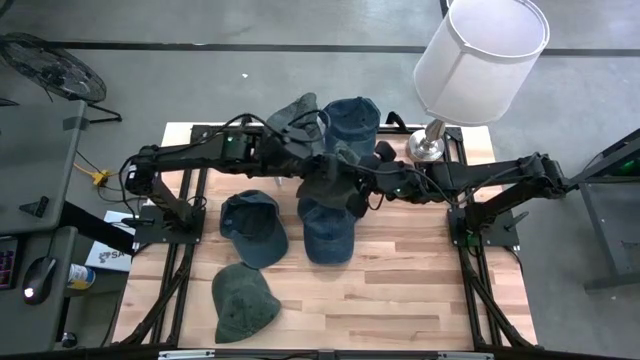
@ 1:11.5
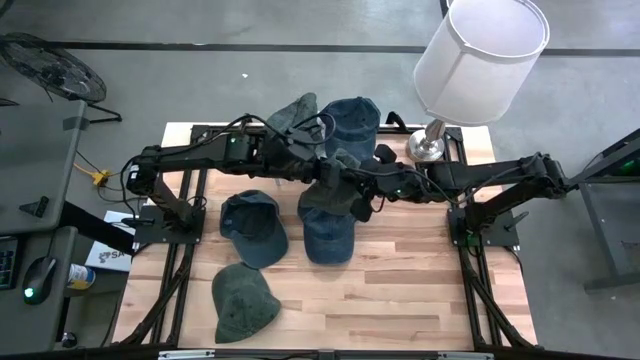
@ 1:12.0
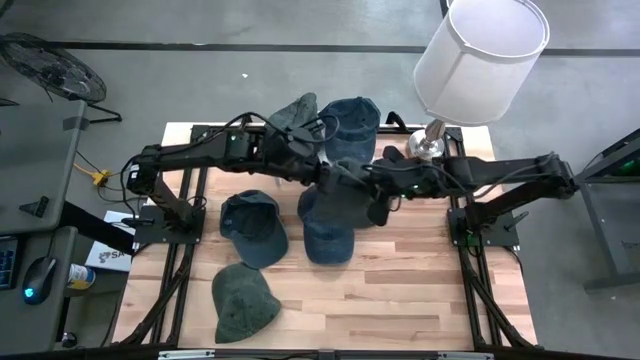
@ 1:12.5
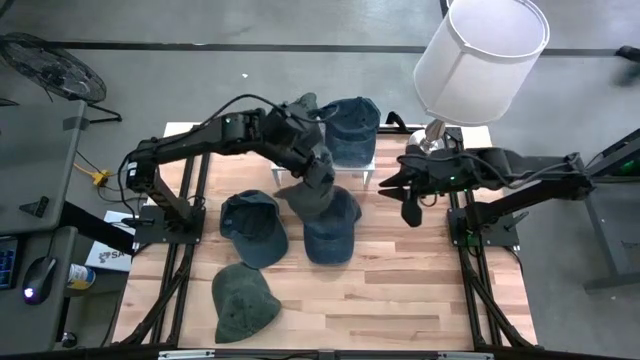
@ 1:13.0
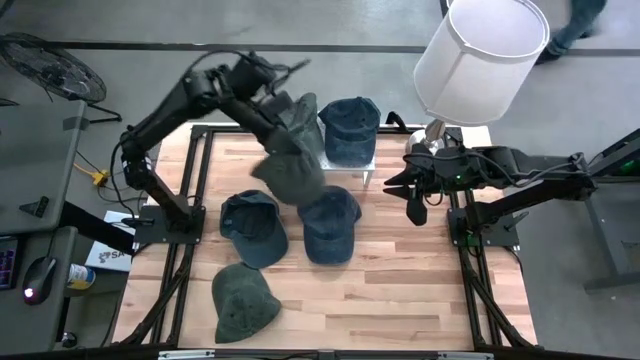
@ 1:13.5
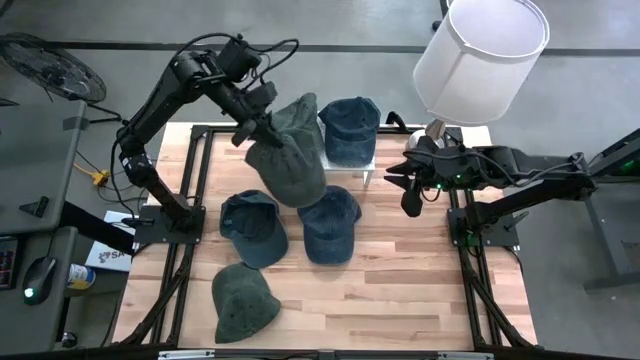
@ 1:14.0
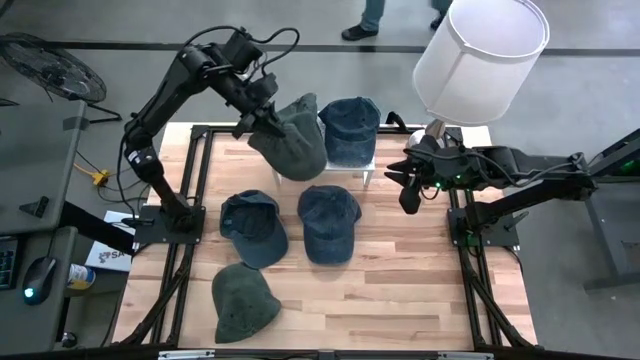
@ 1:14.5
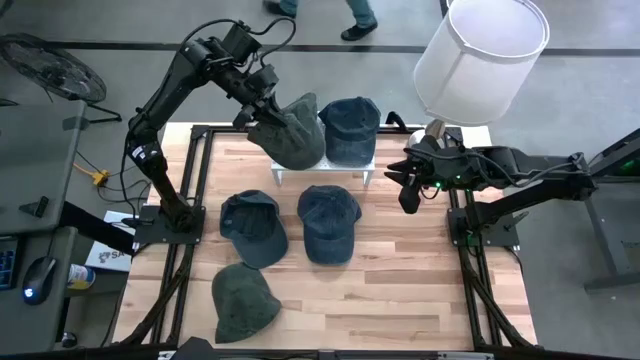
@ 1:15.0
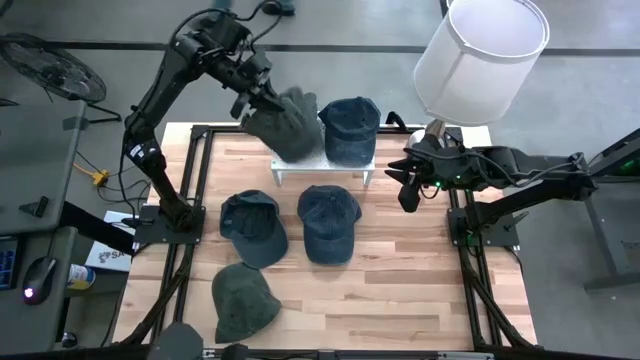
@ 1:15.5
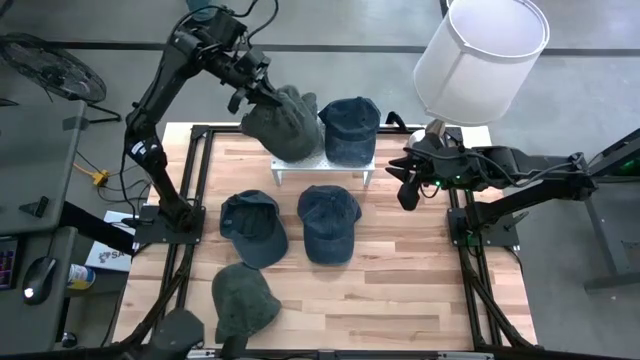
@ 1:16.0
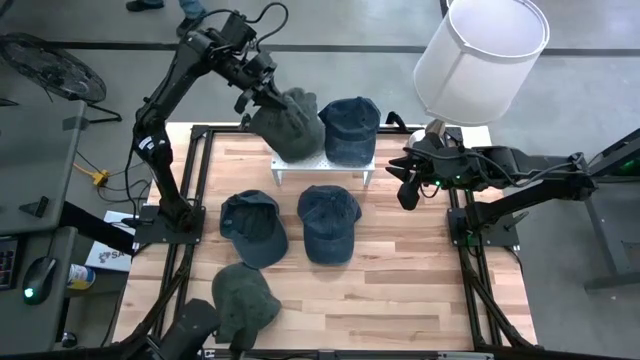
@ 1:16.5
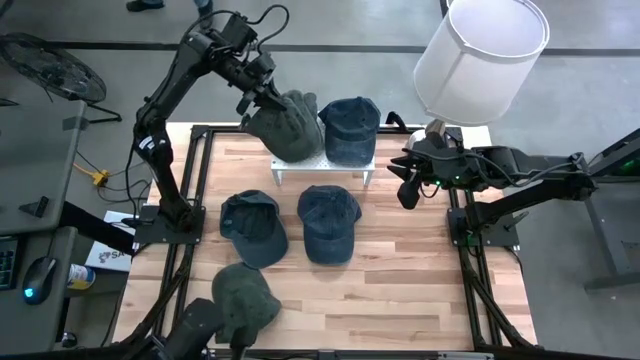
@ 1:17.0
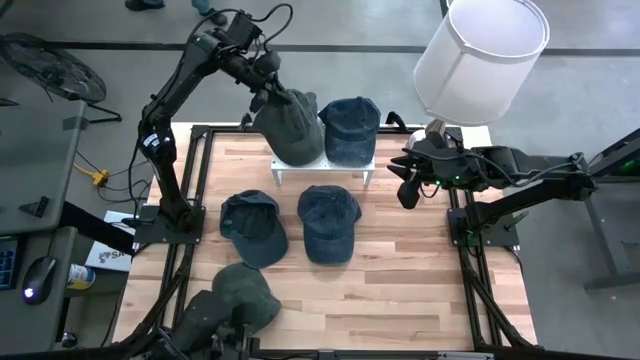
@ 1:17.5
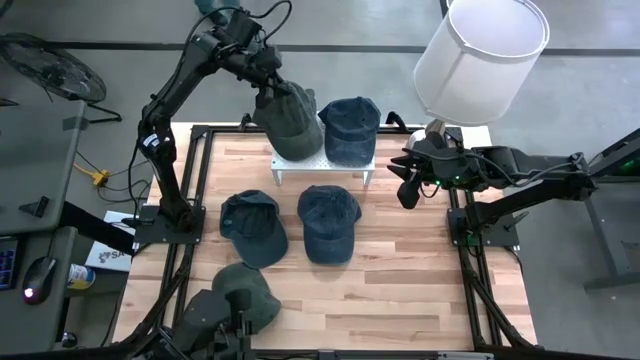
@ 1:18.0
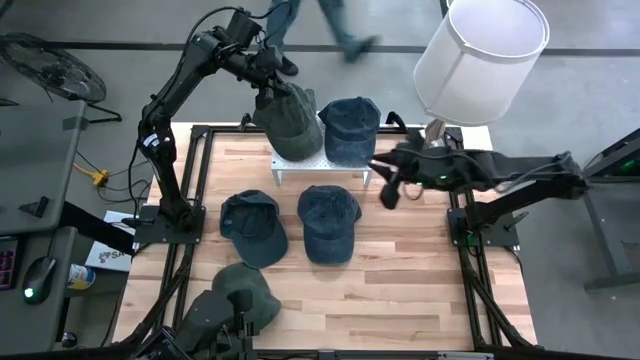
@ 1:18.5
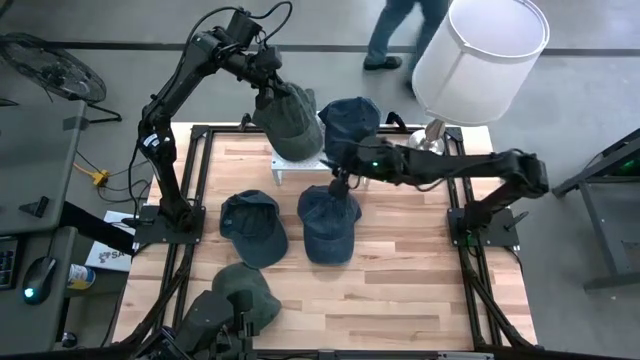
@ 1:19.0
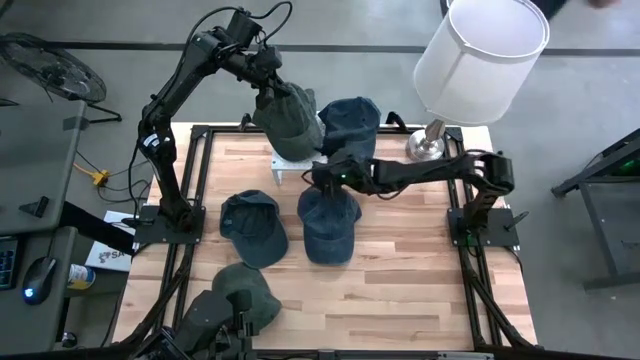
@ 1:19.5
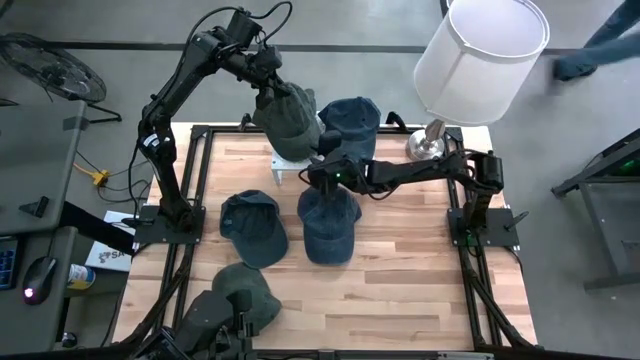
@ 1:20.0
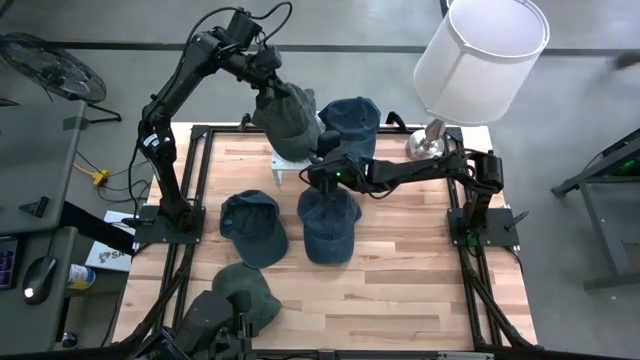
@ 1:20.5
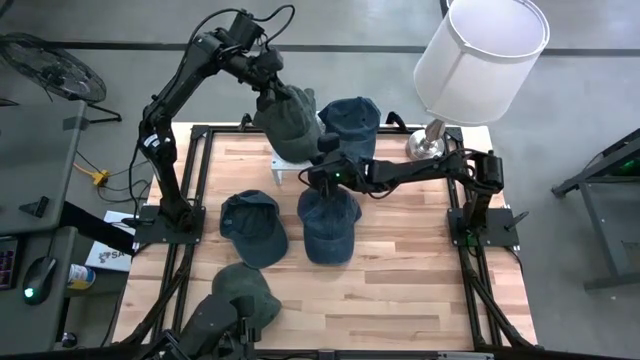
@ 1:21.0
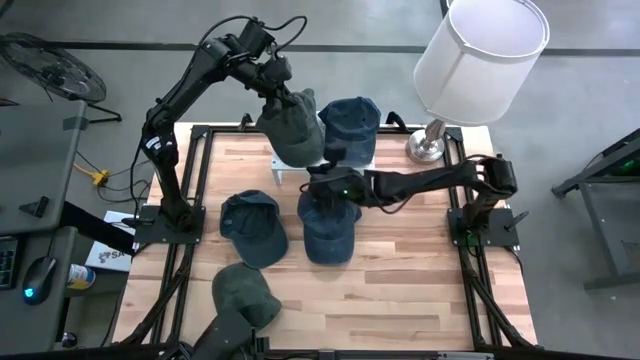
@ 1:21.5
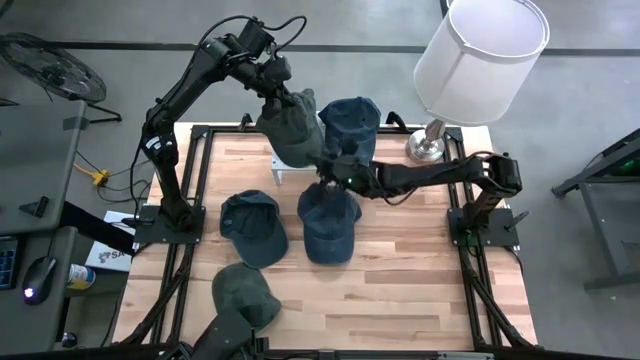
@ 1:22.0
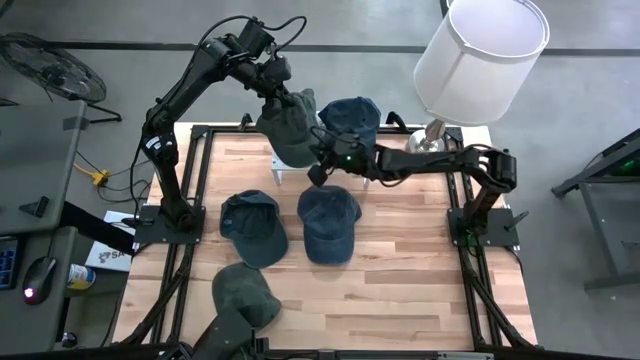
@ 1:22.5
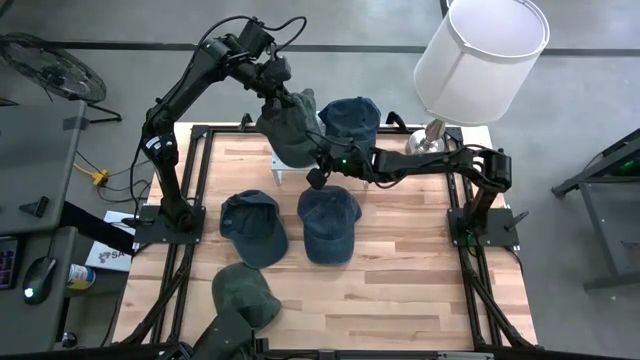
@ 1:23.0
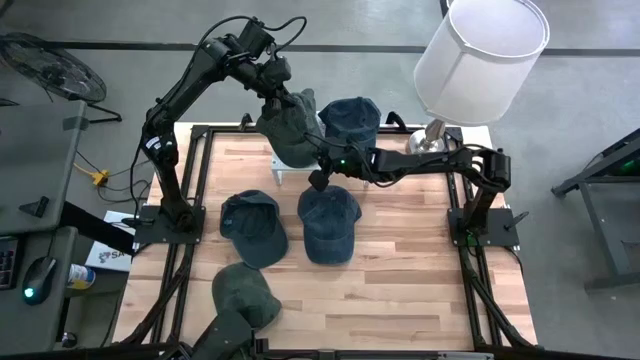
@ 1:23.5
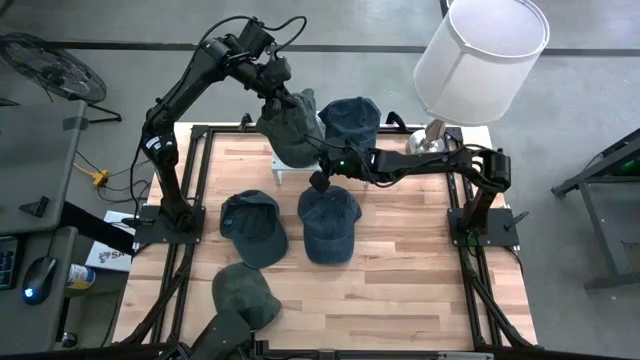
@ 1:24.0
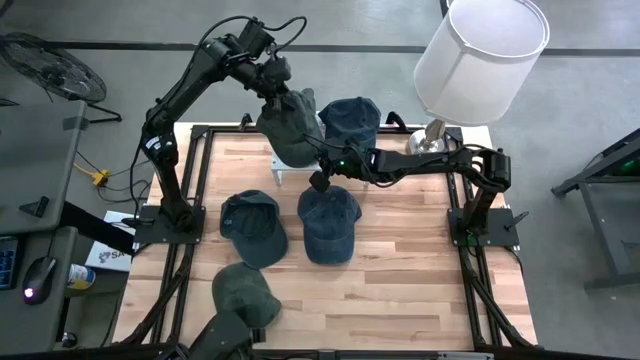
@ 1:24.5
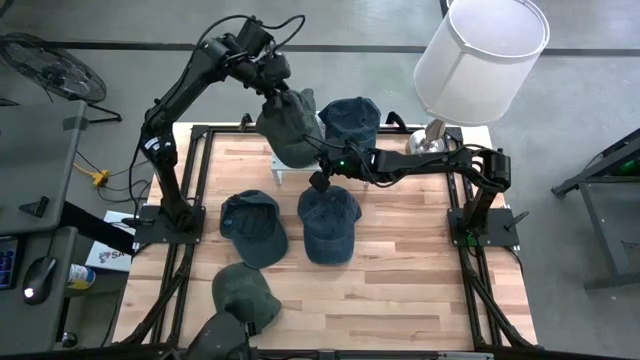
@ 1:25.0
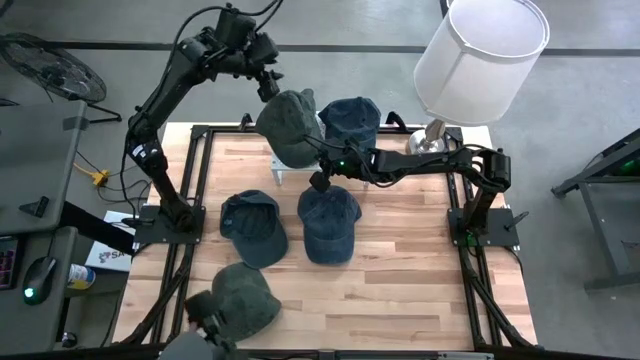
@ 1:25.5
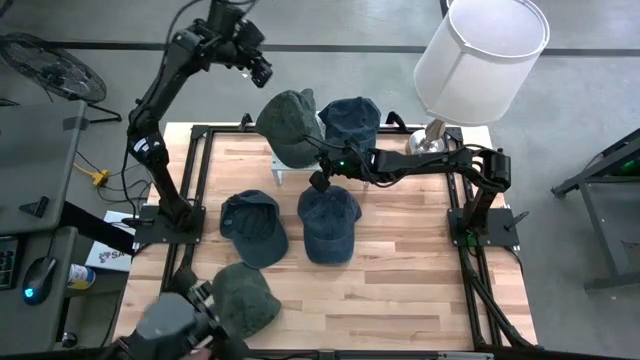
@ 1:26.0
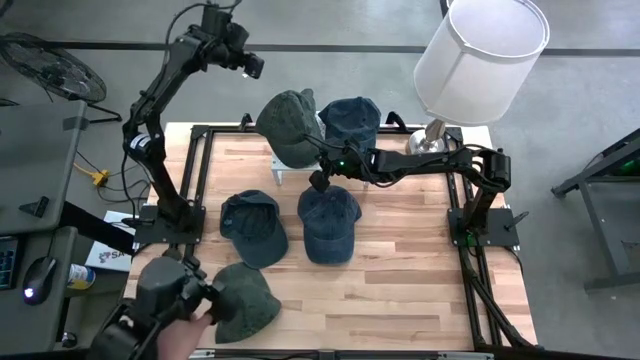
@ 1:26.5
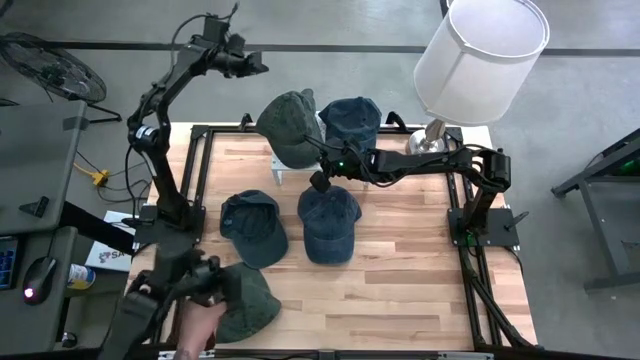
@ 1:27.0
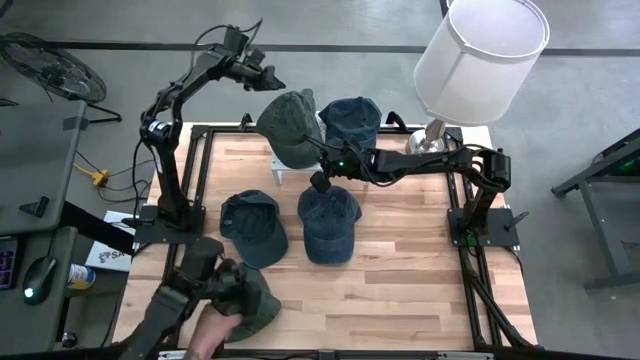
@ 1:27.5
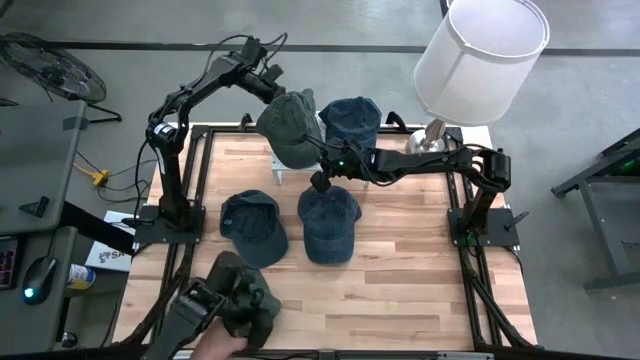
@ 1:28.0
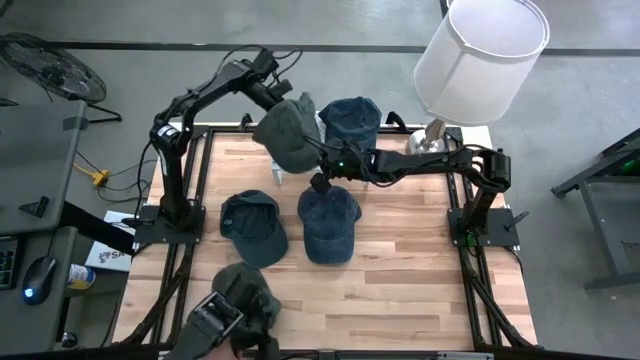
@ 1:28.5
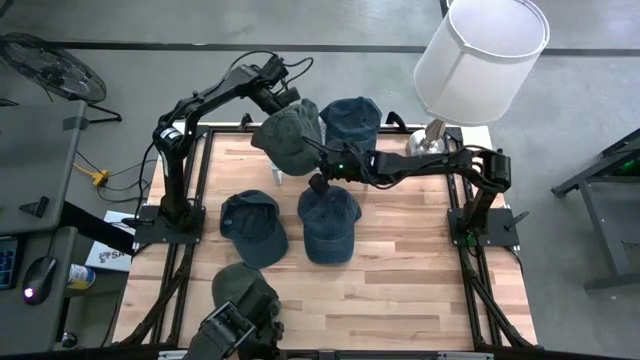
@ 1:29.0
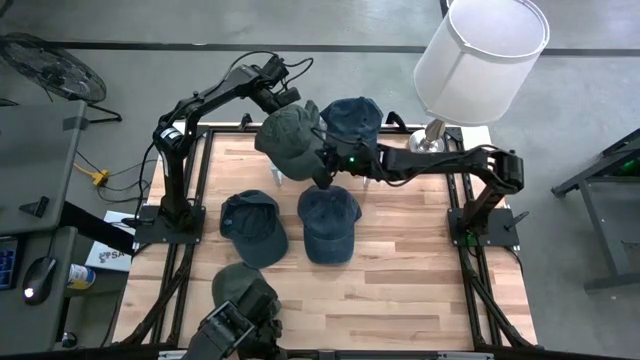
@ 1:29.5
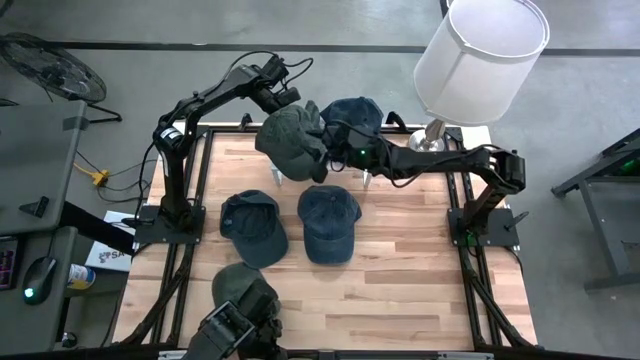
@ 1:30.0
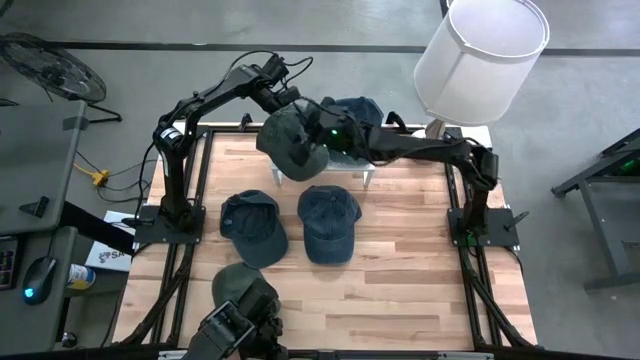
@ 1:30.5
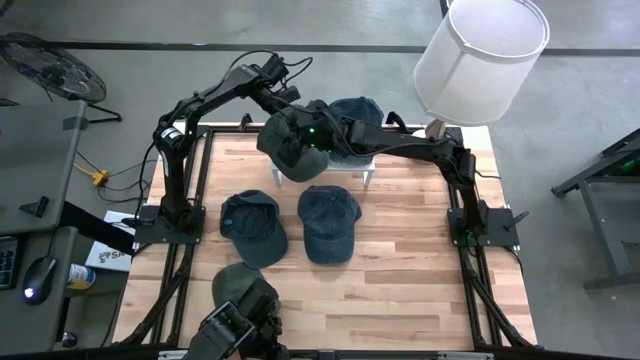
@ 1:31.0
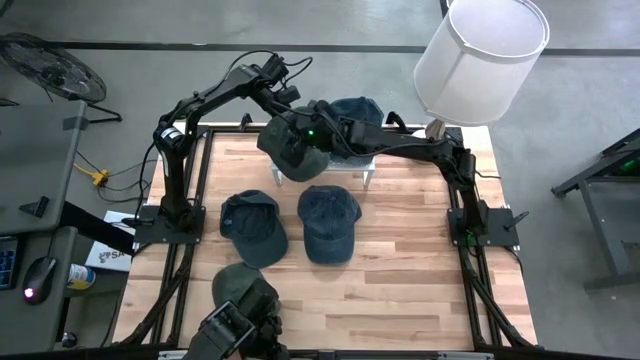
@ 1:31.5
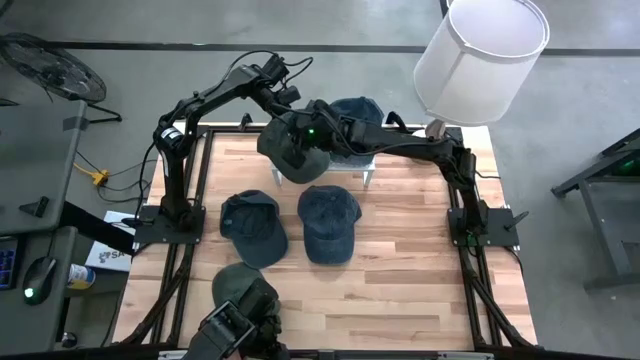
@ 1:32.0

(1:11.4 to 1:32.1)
Task: Pick & Place hat
Stack the right gray cap on top of the gray cap on the shelf

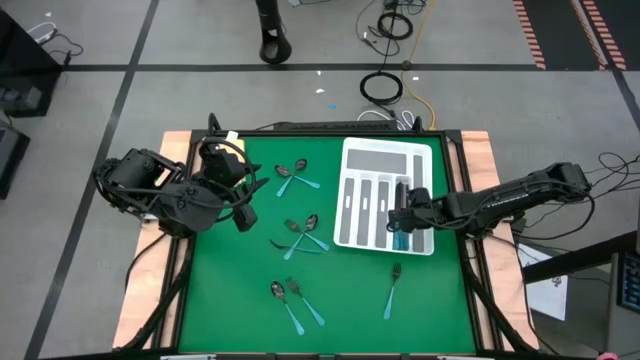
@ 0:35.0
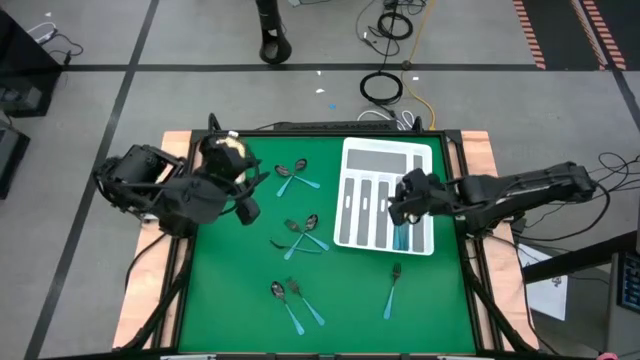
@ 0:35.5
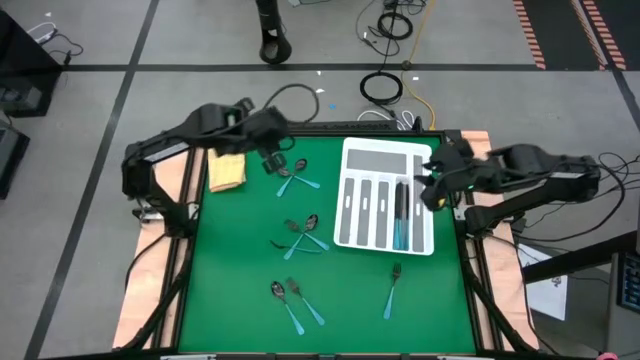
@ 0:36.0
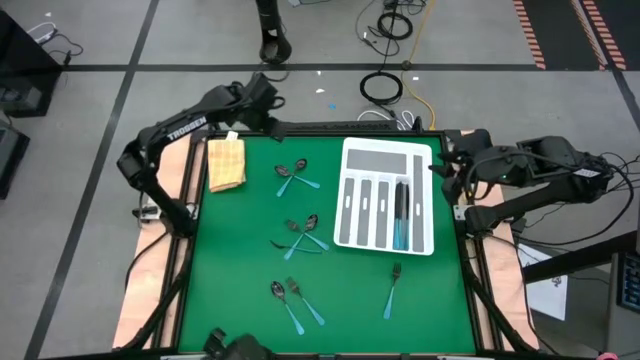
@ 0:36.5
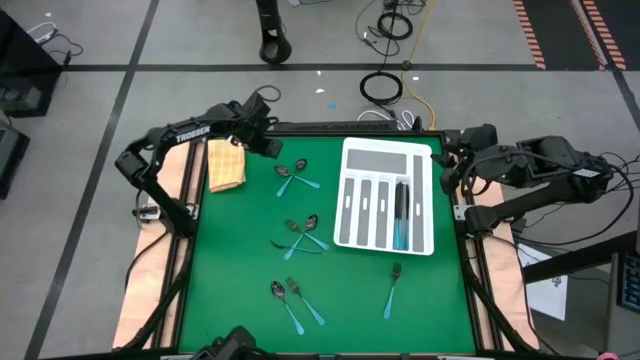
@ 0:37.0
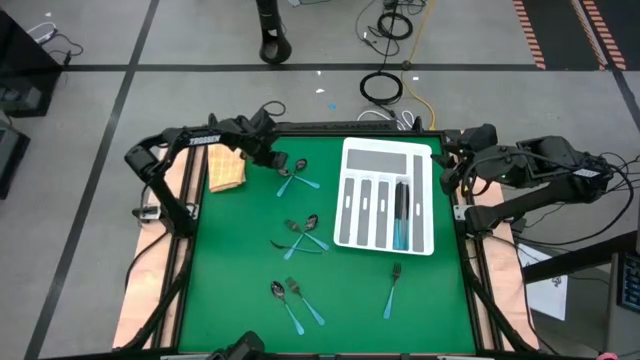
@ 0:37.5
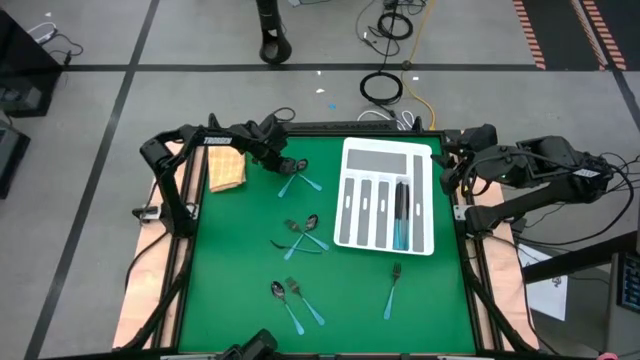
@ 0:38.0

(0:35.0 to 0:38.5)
Task: Sort silverware
Put the blue spoon into the silverware tray
